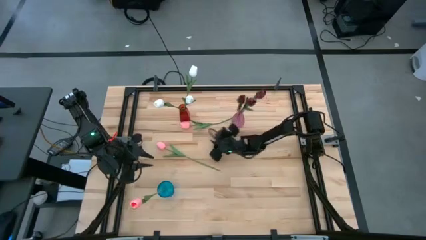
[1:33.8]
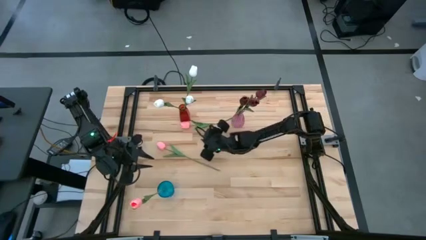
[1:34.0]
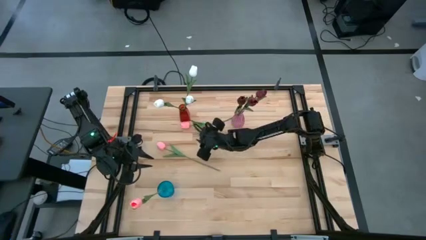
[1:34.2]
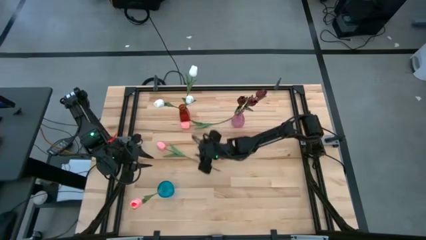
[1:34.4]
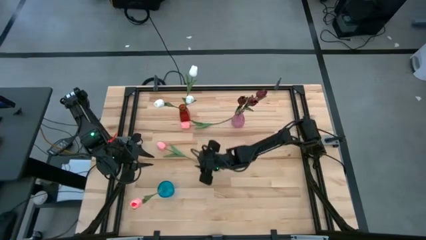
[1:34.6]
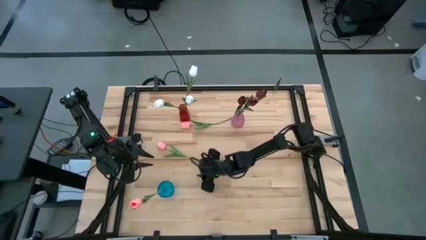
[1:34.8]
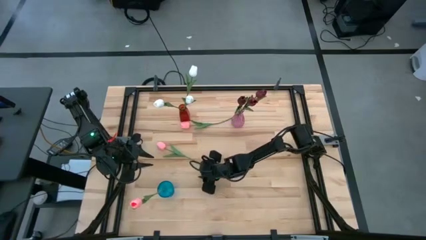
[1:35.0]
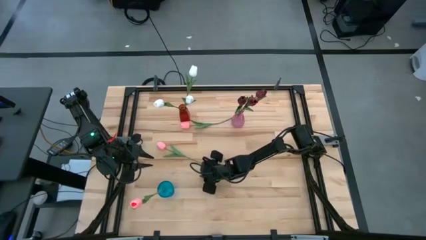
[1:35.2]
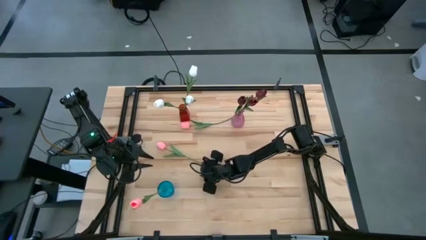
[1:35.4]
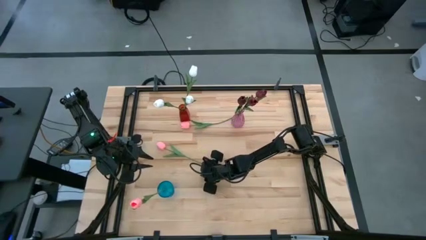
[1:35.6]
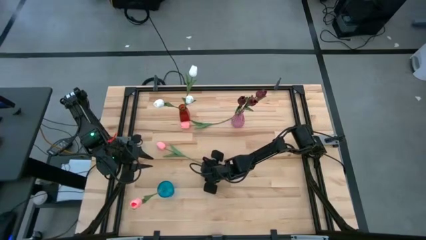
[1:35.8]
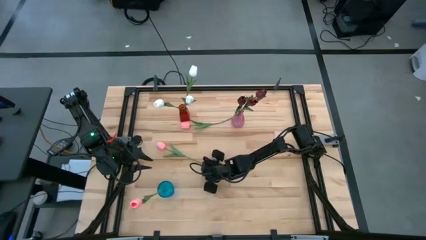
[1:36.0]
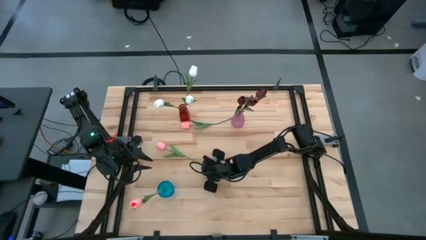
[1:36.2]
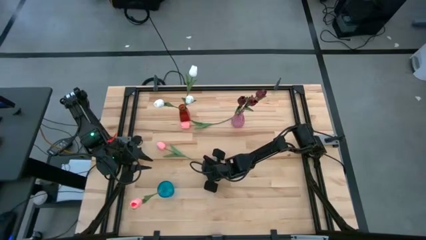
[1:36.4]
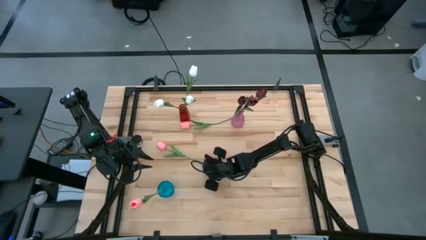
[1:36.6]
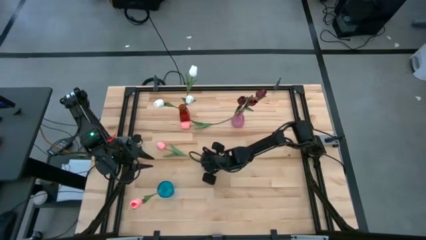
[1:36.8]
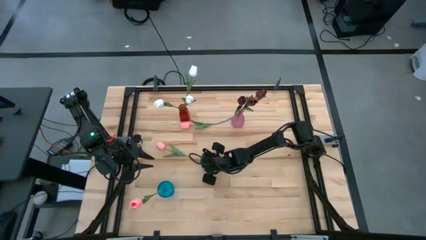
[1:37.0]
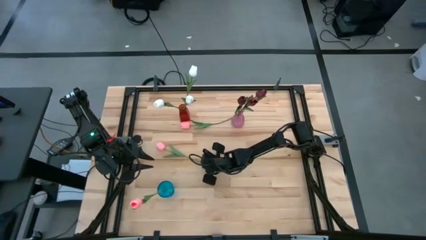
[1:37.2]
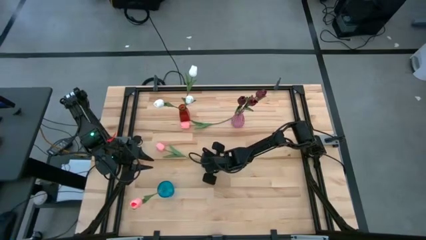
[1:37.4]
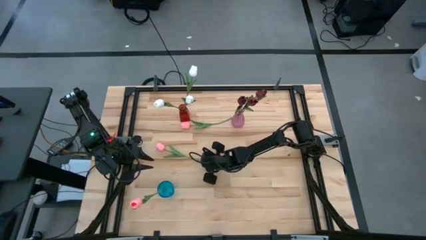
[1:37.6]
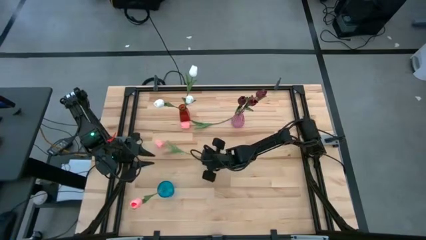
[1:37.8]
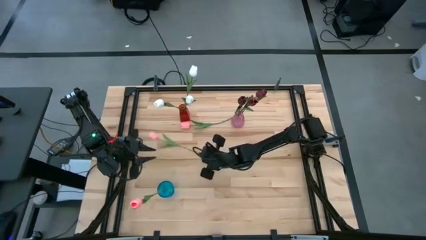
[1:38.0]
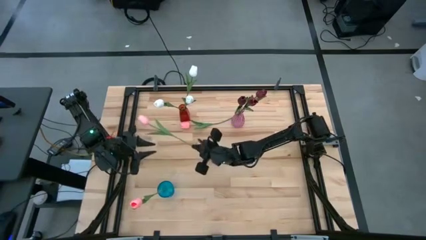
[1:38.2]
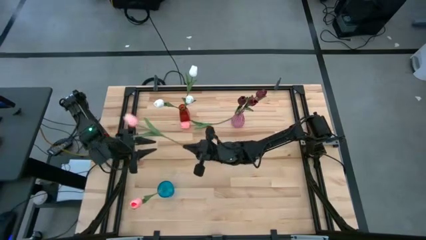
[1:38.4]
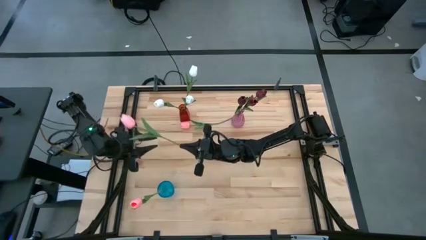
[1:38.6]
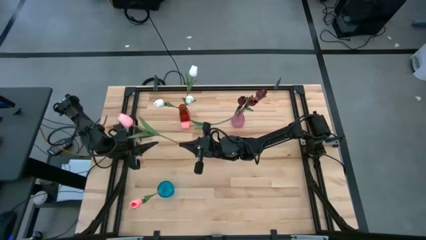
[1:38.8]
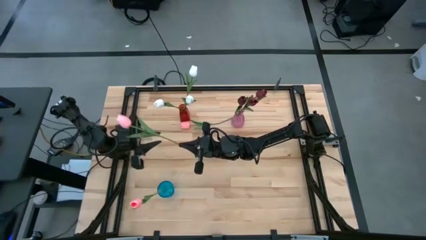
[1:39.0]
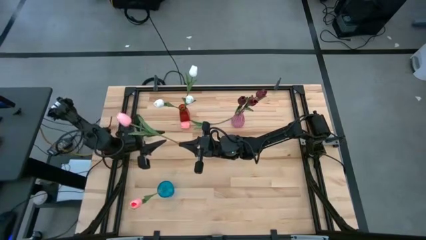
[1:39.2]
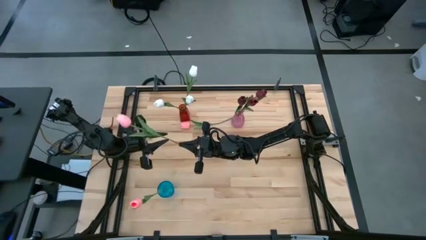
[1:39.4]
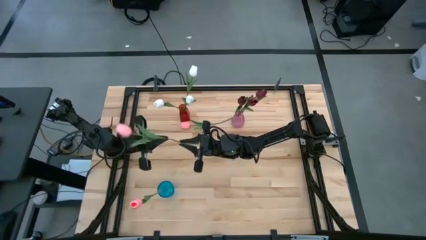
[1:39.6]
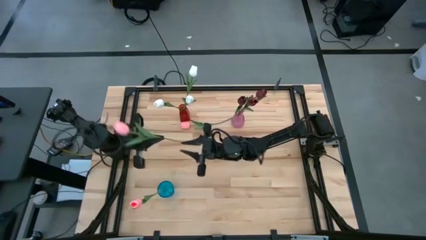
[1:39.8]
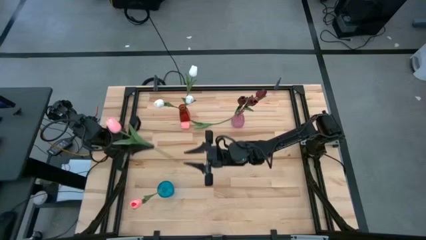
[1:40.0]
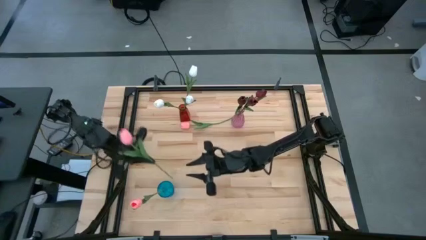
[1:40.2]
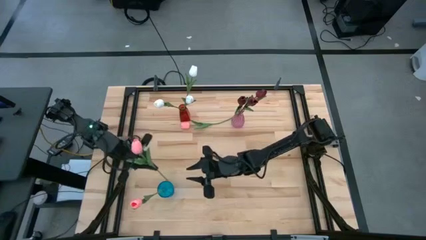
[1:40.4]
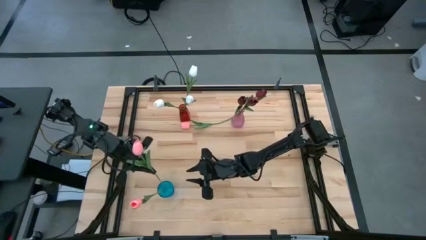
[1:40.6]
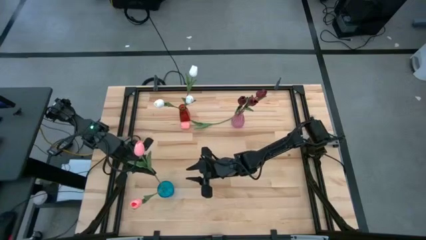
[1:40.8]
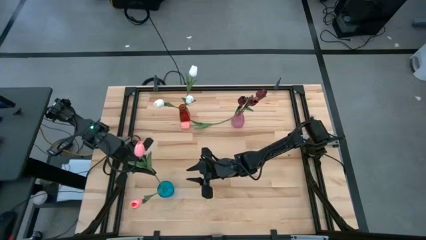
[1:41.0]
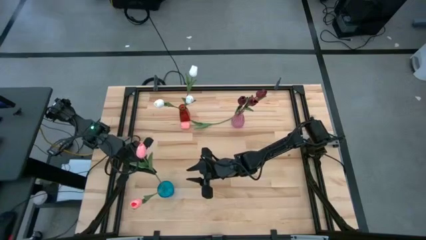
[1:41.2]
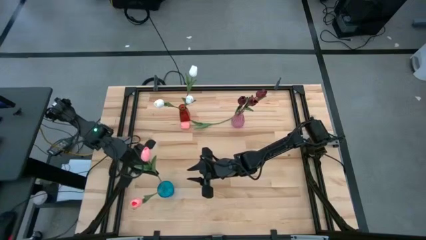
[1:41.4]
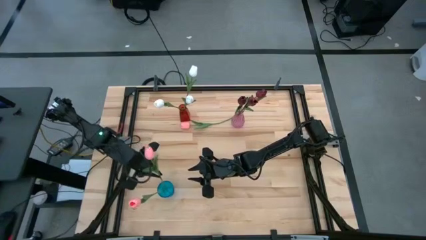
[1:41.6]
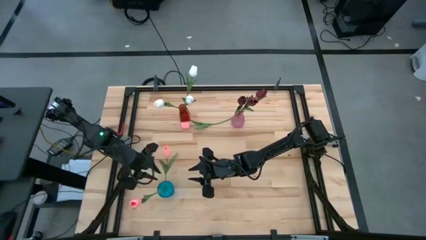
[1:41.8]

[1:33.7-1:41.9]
Task: Sort flowers into vase by color
Put the bottom pink tulip into the blue vase

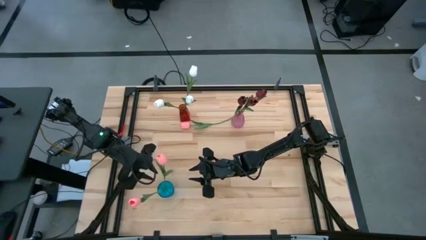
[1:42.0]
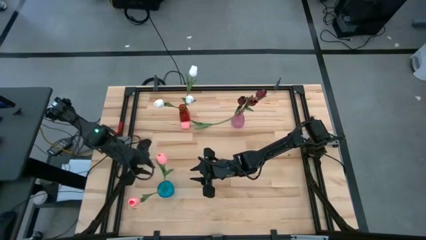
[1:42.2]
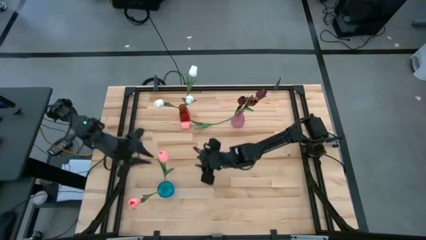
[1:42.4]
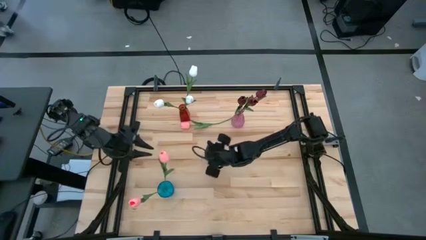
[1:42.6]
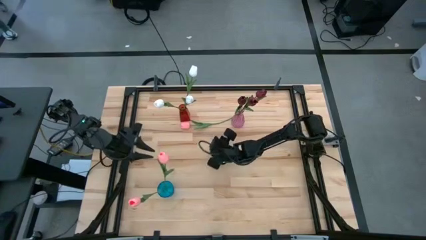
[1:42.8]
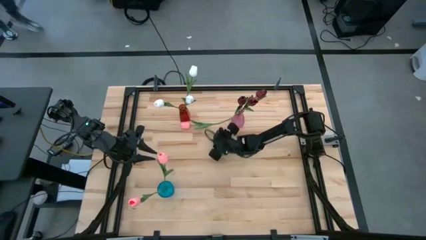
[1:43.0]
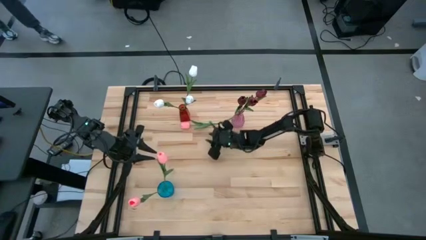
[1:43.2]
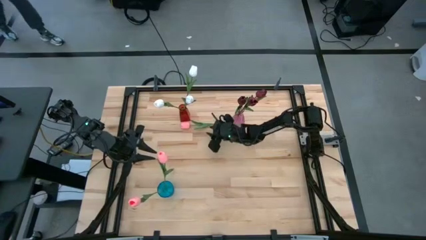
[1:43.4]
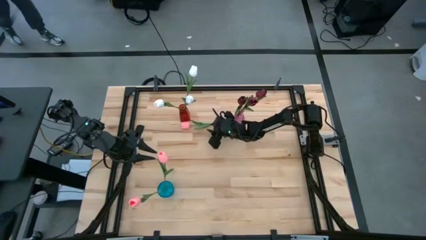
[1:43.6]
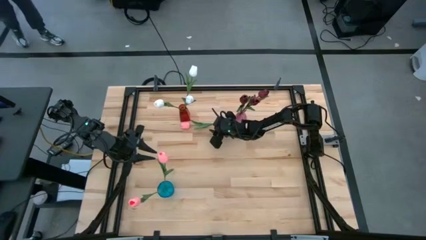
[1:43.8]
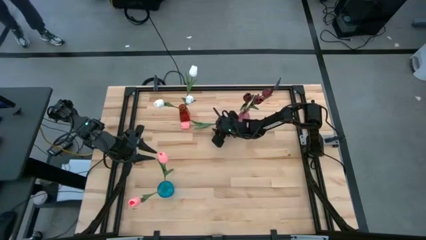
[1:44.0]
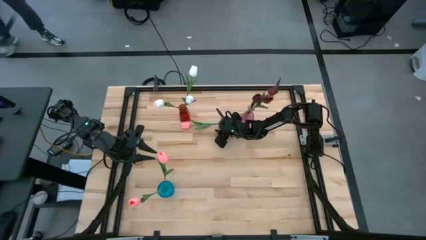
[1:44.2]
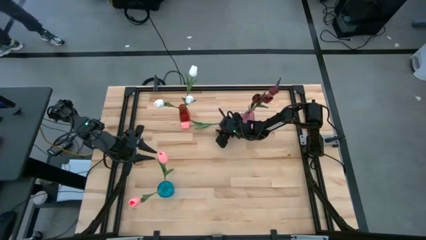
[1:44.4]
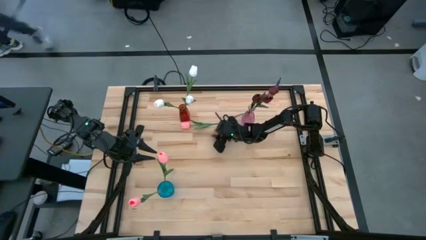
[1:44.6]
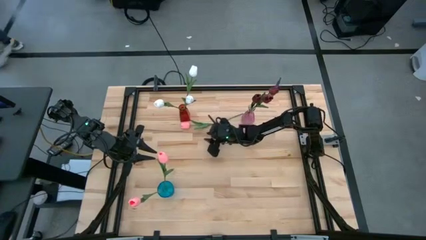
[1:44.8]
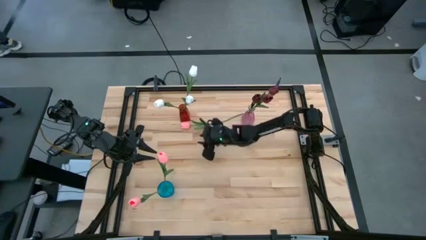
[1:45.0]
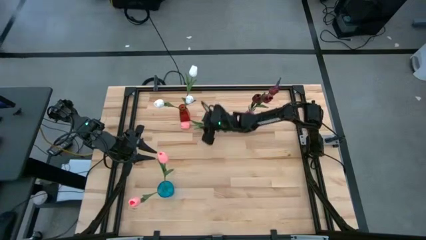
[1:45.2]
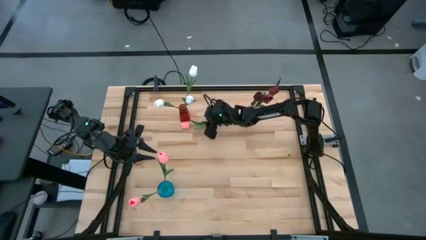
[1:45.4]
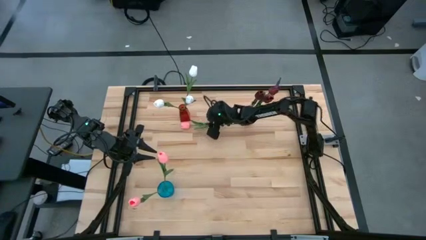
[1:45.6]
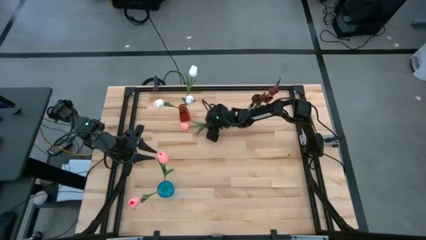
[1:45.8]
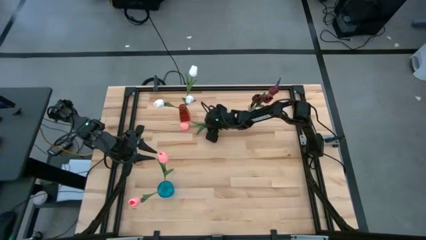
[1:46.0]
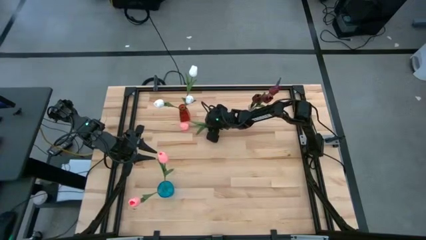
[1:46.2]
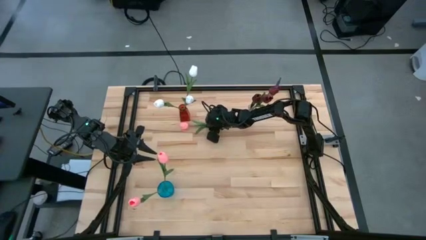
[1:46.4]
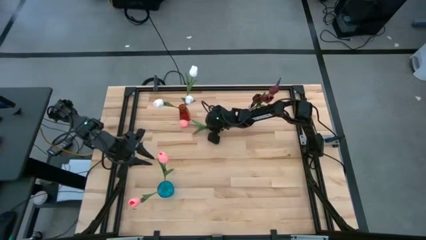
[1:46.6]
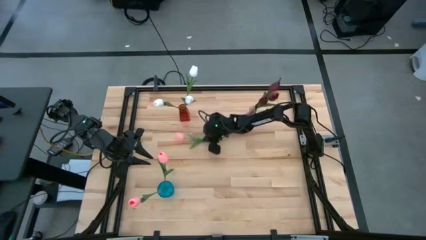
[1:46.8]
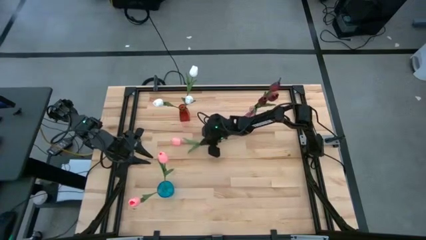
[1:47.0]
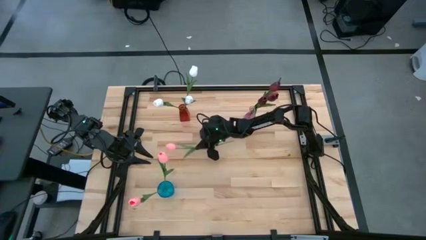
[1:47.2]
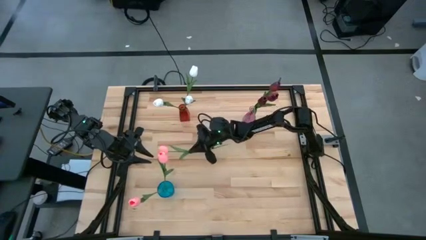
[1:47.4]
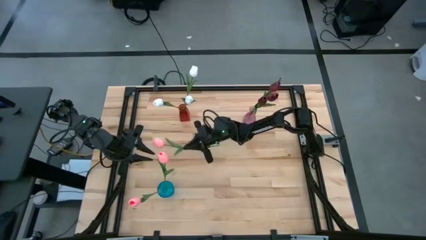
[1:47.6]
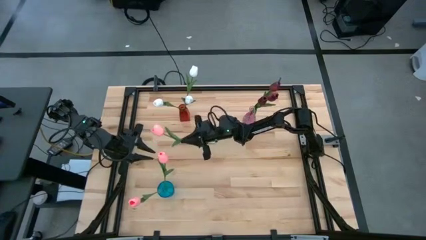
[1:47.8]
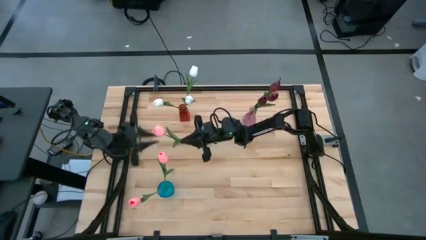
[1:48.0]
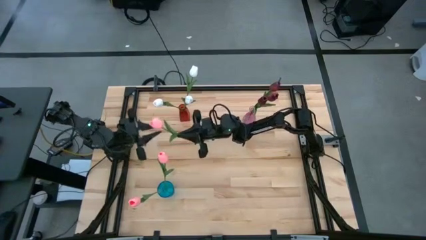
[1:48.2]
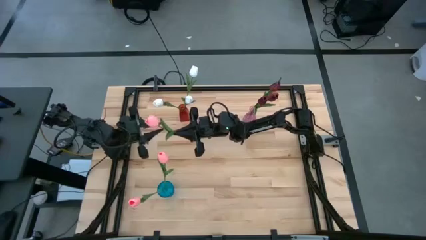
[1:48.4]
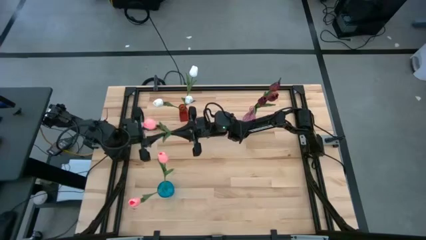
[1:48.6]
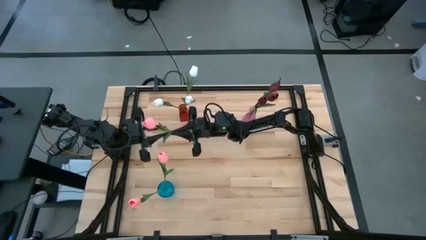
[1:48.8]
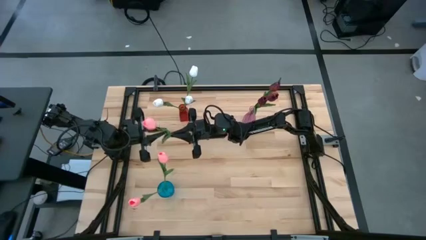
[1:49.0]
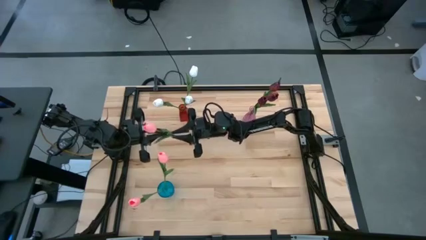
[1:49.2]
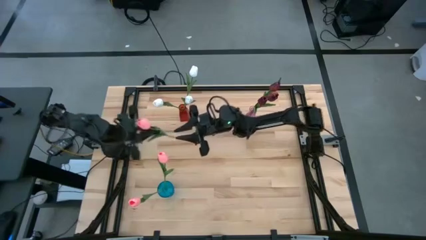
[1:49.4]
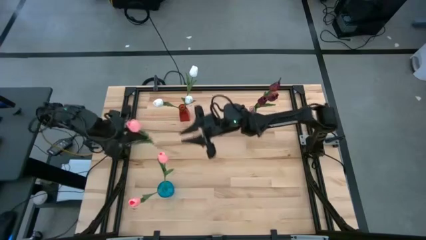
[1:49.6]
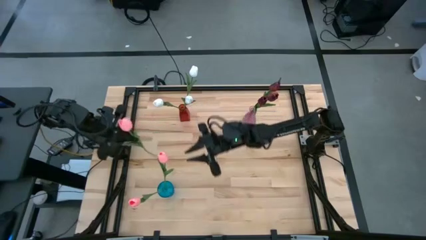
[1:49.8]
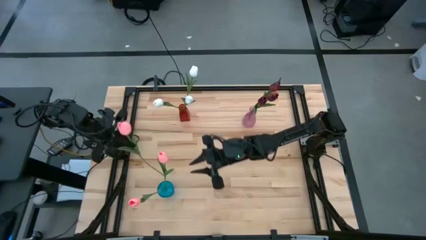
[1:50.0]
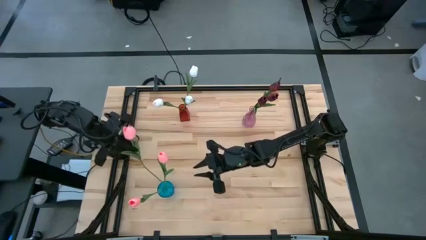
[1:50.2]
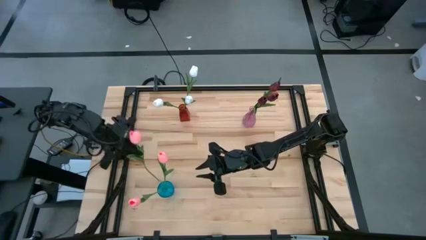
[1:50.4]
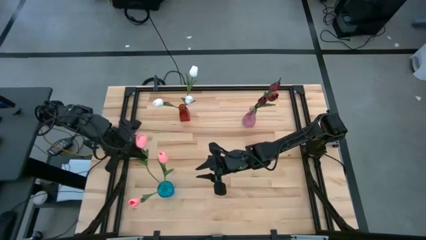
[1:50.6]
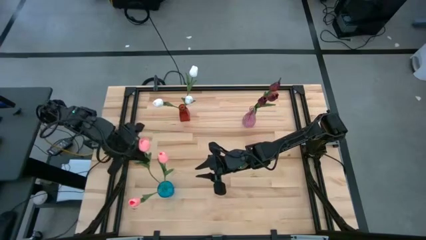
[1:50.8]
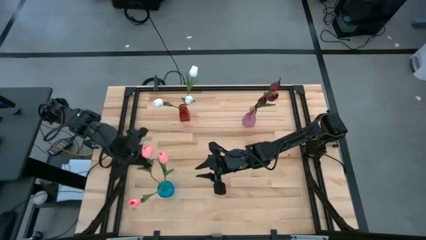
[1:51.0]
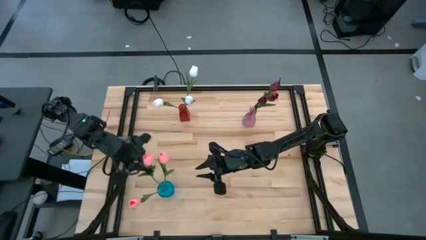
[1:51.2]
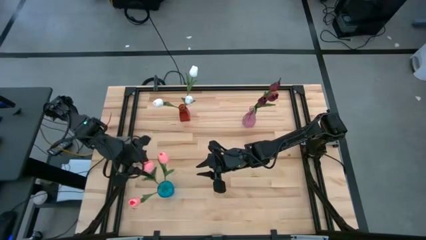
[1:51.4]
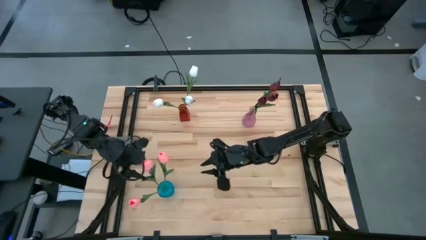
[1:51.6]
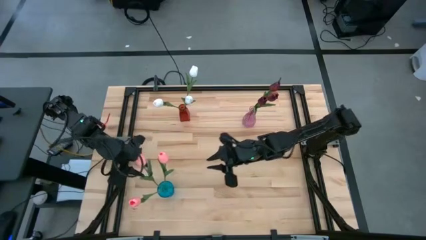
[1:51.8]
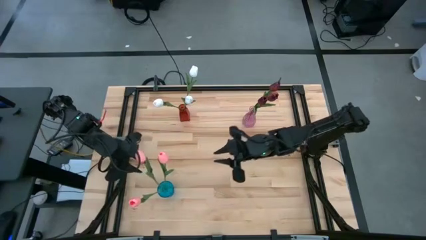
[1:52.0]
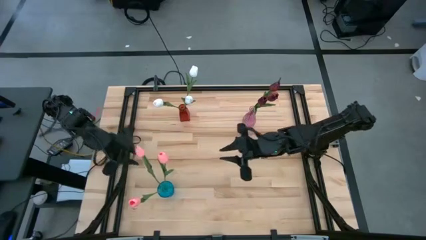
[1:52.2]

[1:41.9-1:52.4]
Put the pink tulip into the blue vase
